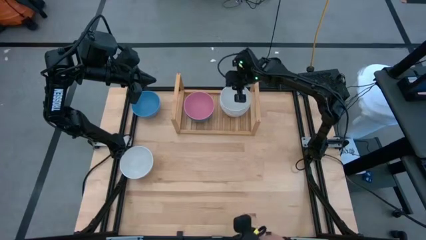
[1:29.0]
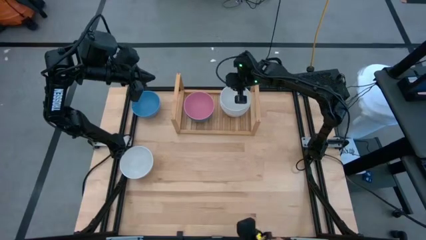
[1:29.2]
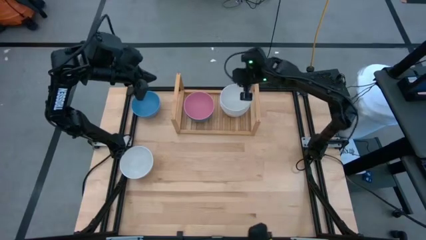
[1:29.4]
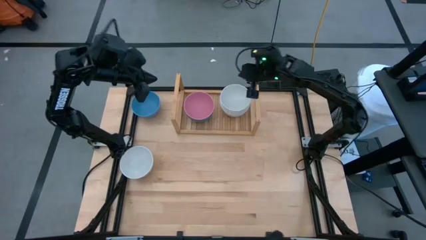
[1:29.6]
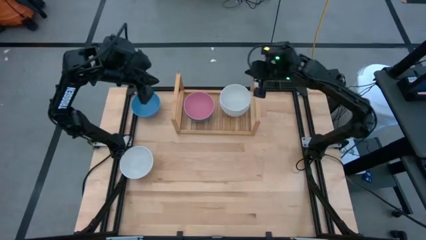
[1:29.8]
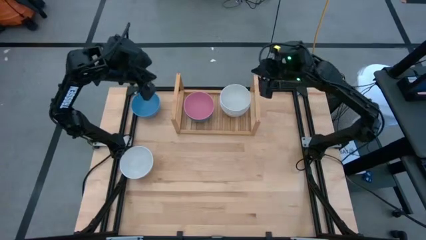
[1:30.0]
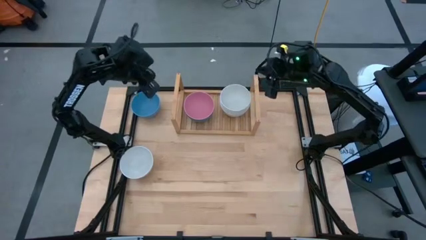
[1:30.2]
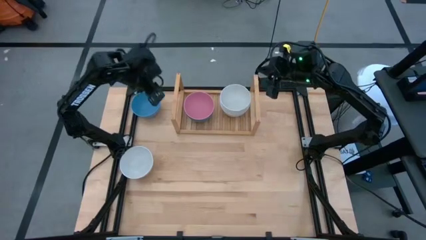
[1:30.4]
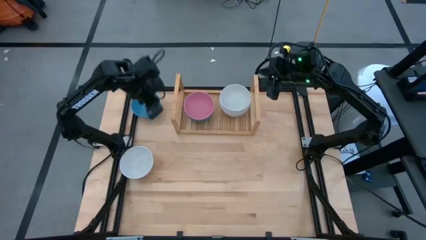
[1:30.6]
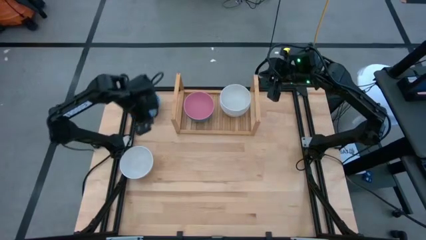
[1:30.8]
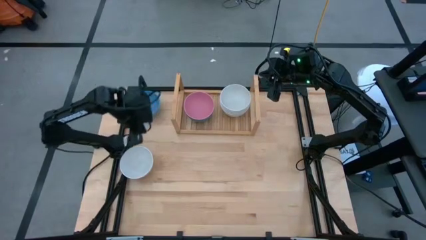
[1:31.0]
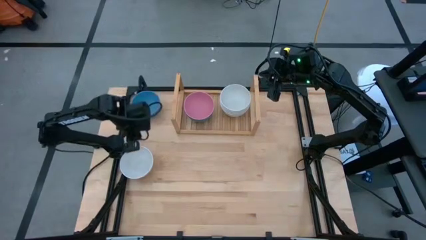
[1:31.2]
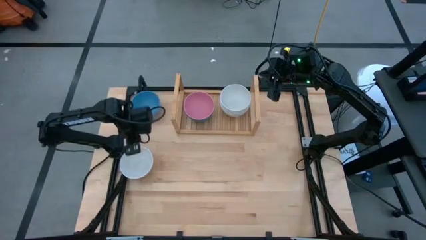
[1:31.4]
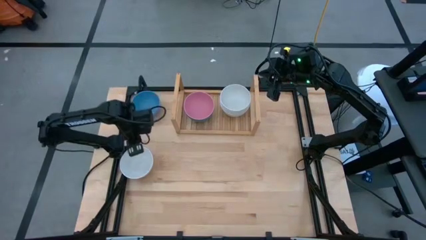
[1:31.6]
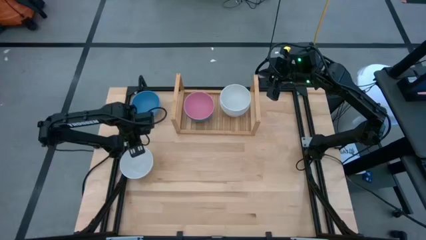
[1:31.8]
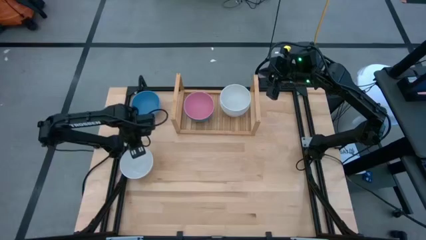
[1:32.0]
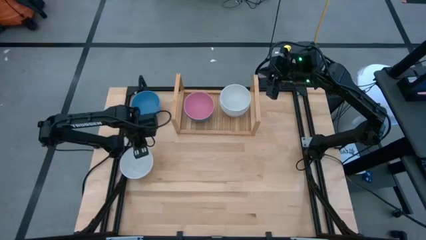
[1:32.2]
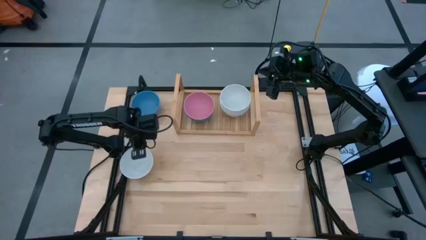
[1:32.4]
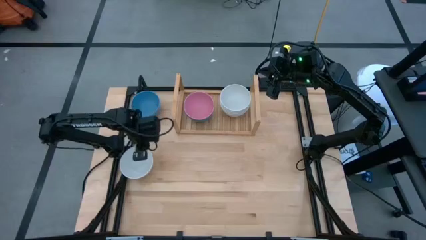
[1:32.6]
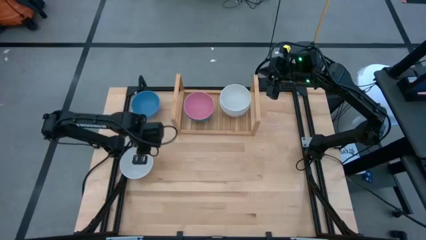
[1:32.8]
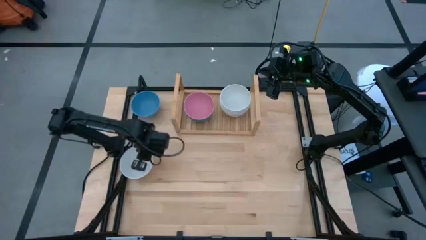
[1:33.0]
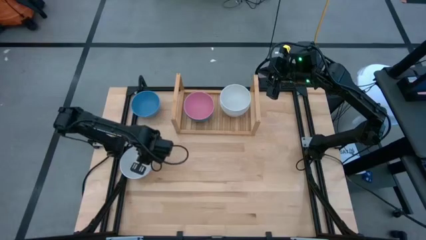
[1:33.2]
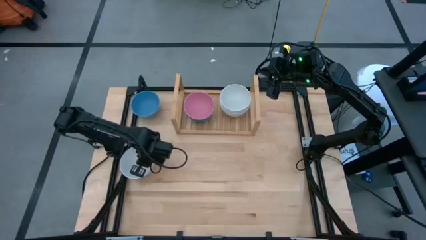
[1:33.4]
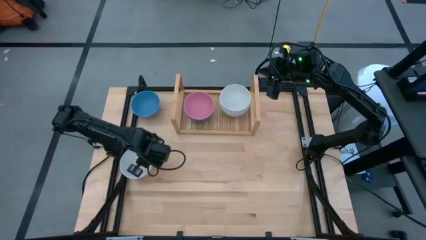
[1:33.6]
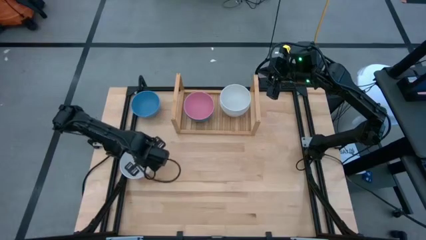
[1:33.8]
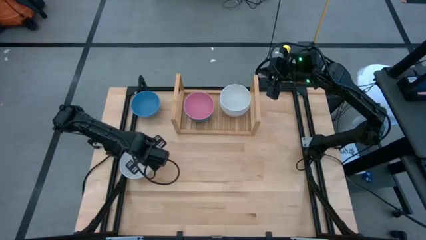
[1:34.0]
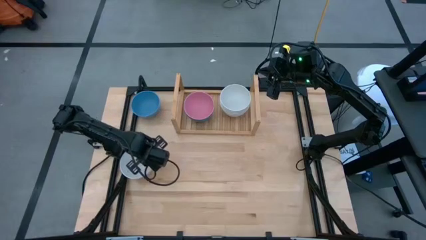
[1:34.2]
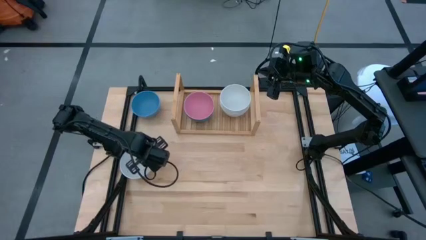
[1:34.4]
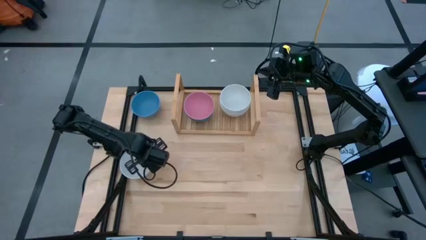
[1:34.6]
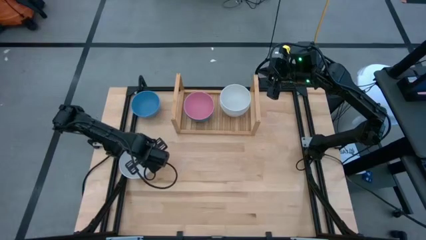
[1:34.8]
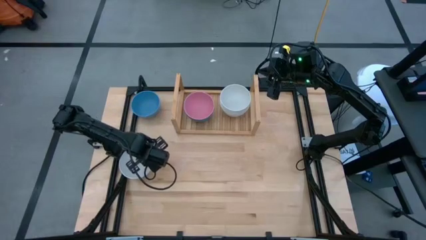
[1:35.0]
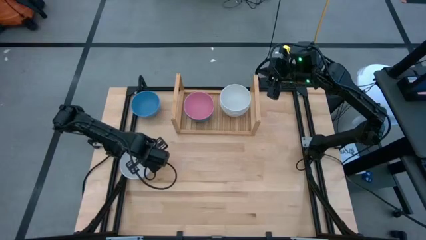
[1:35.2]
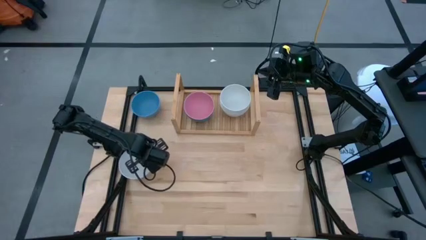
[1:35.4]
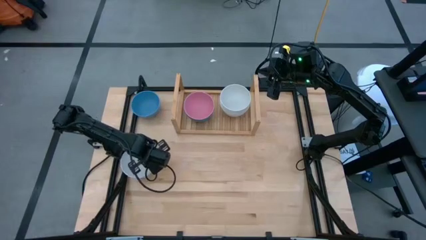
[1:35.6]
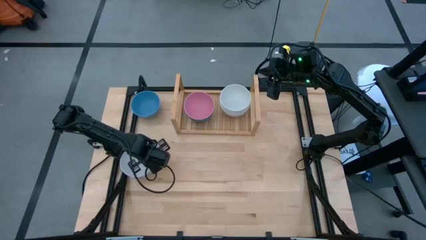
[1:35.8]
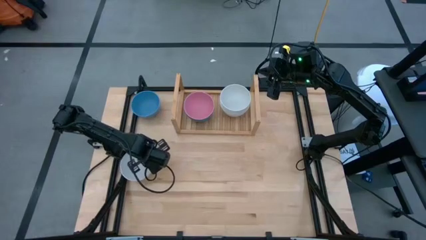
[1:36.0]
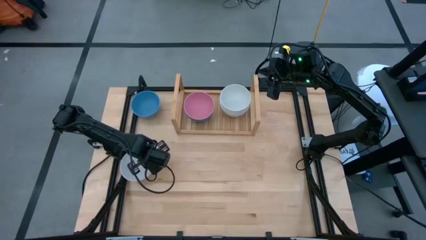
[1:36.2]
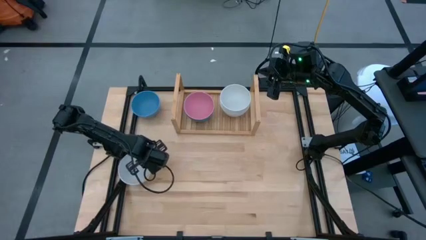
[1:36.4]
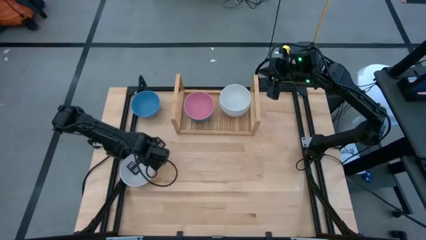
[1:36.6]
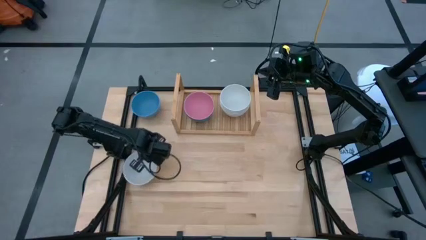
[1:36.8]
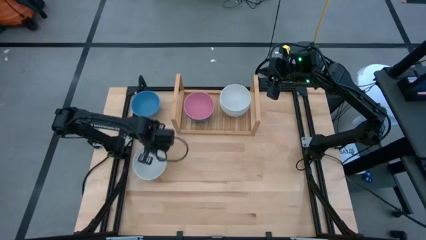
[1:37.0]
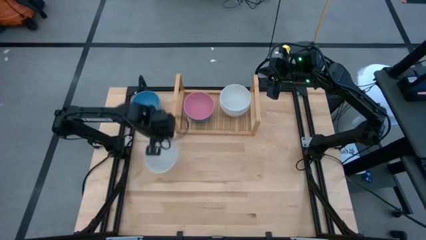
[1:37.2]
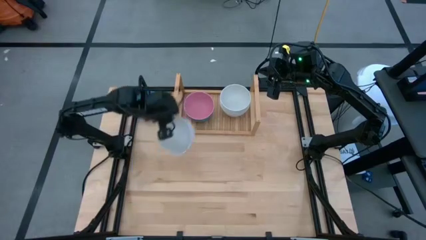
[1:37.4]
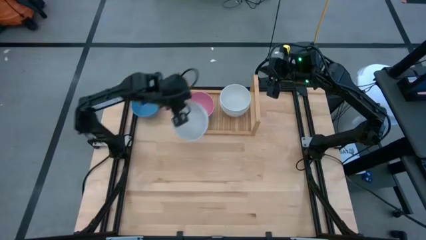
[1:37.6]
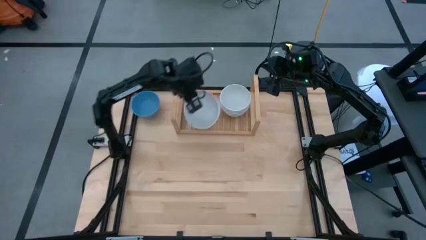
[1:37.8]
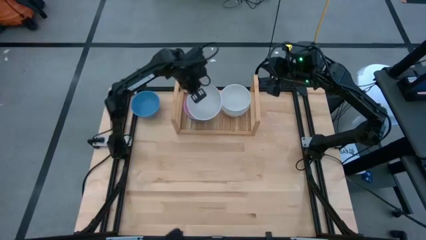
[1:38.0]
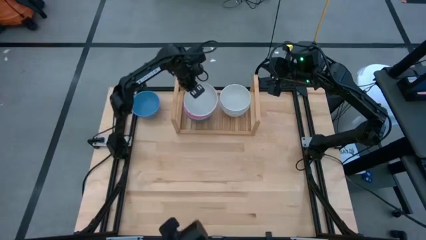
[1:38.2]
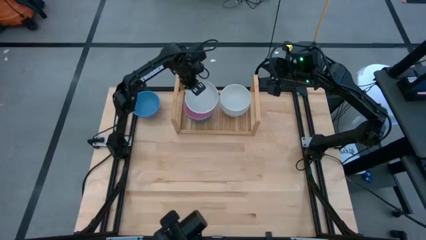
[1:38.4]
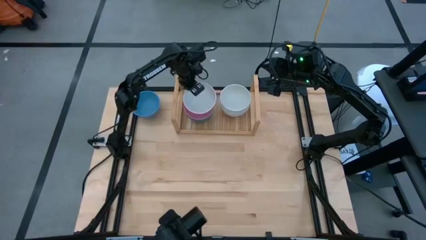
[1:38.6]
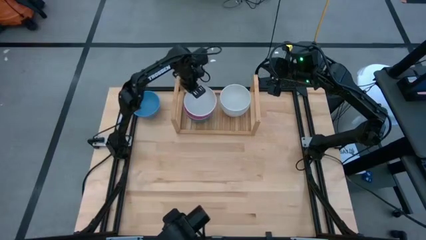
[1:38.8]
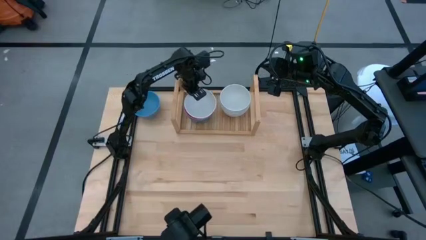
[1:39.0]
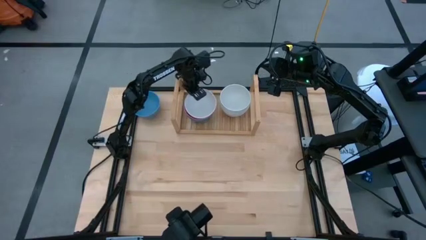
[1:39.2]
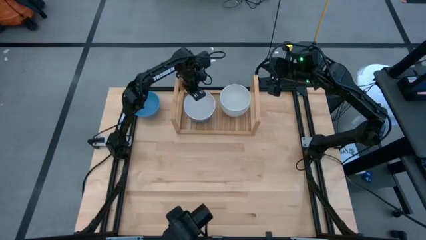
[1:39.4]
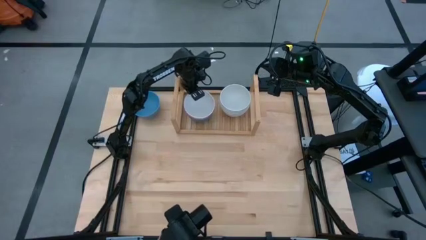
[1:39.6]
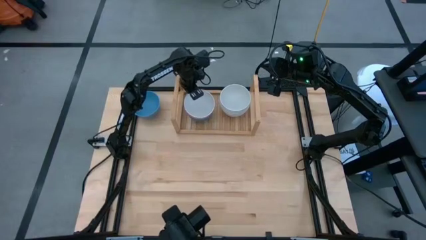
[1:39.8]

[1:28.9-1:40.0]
Task: Place and stack bowls onto a shelf
Stack the white bowl on top of the pink bowl on the shelf
